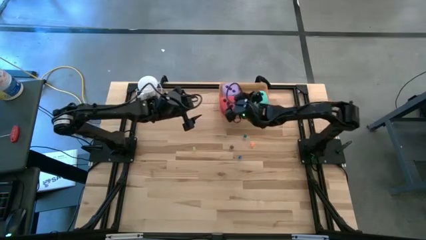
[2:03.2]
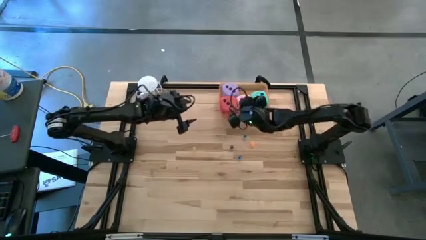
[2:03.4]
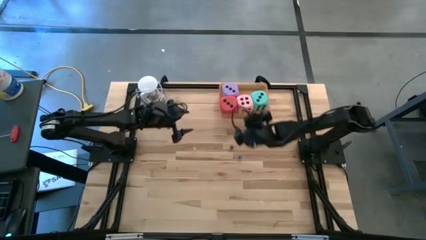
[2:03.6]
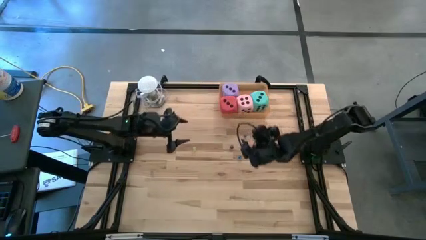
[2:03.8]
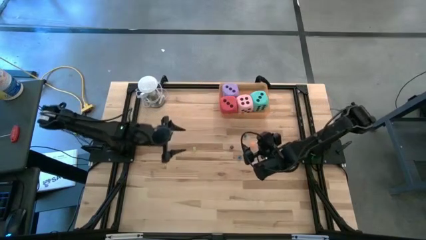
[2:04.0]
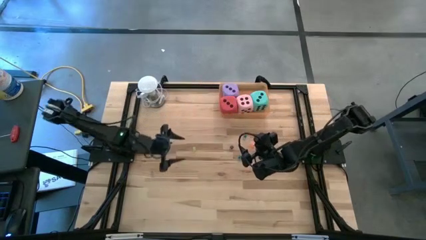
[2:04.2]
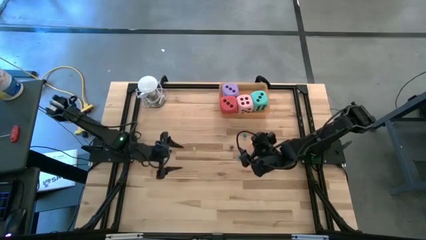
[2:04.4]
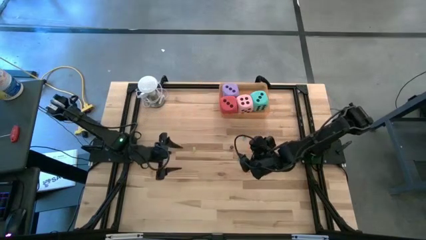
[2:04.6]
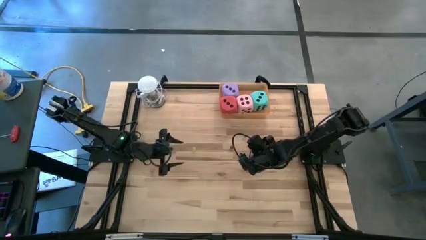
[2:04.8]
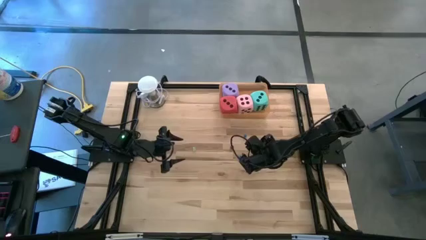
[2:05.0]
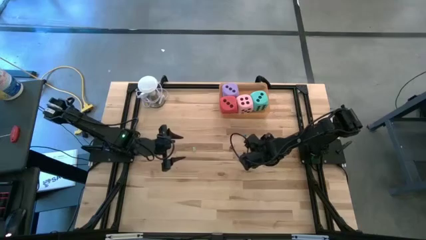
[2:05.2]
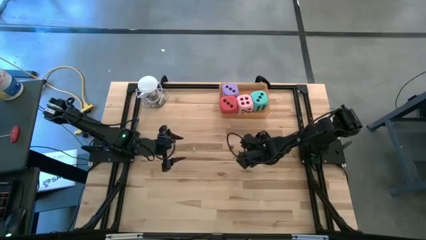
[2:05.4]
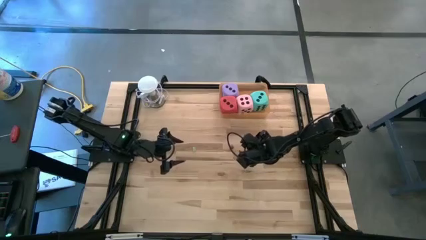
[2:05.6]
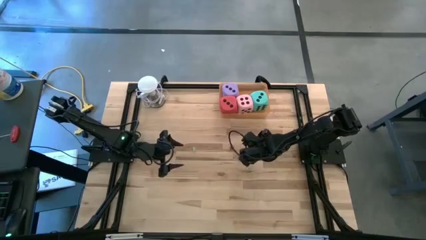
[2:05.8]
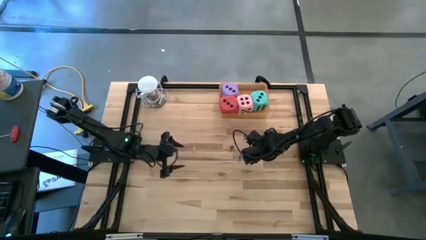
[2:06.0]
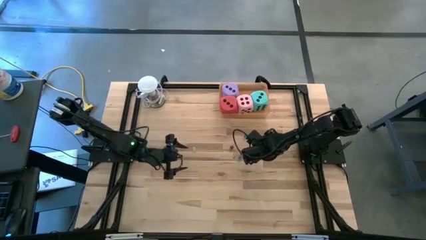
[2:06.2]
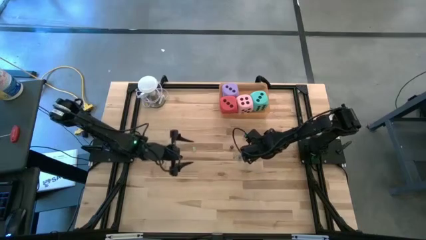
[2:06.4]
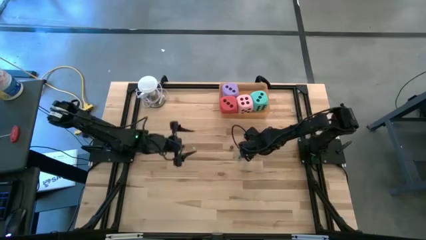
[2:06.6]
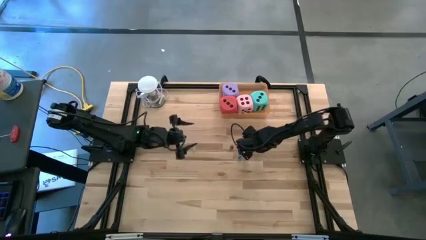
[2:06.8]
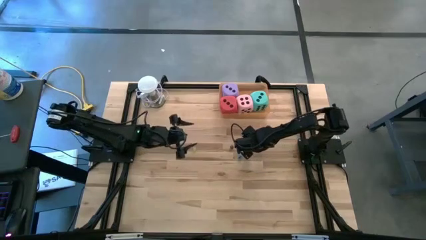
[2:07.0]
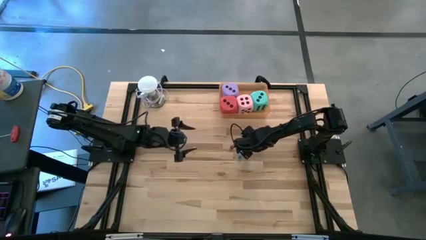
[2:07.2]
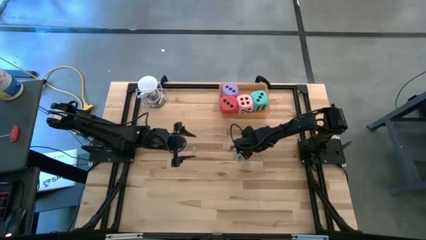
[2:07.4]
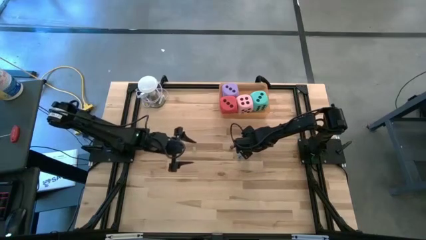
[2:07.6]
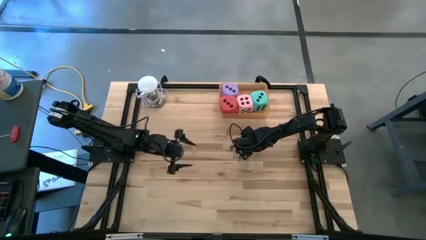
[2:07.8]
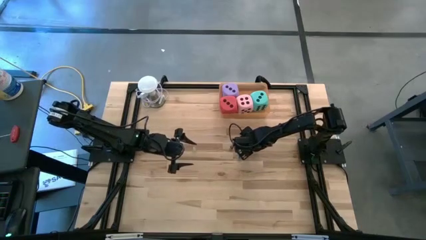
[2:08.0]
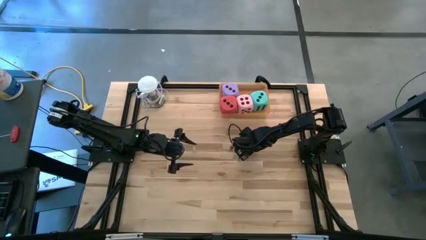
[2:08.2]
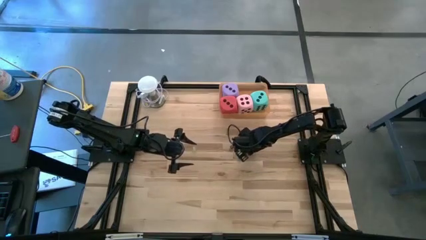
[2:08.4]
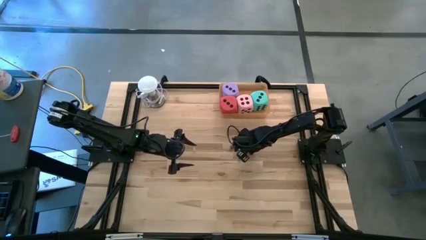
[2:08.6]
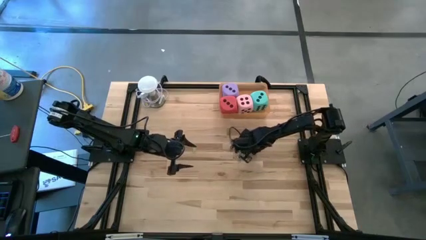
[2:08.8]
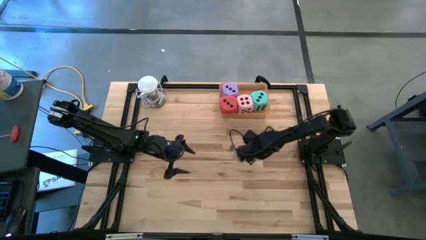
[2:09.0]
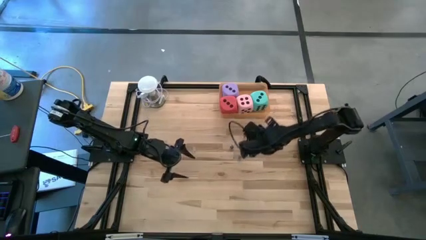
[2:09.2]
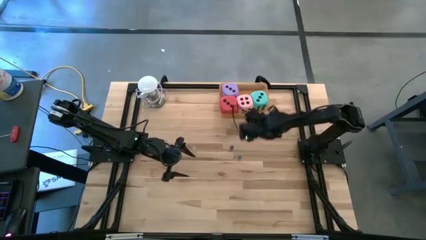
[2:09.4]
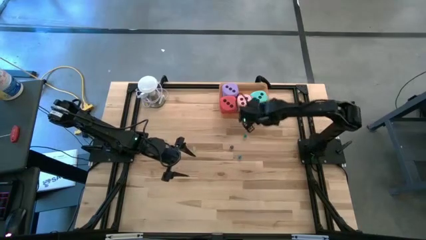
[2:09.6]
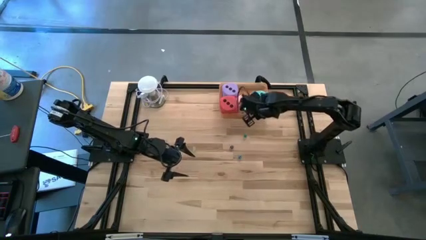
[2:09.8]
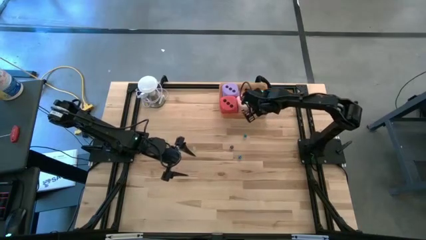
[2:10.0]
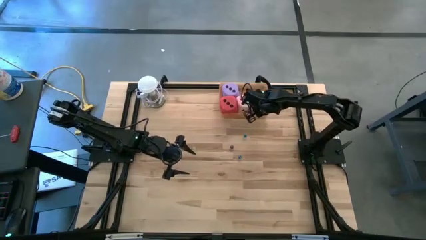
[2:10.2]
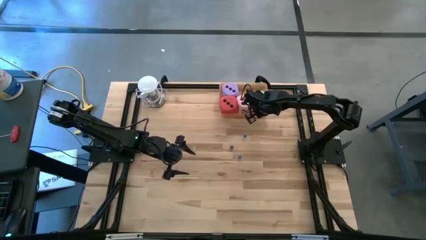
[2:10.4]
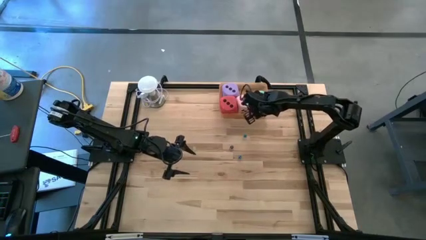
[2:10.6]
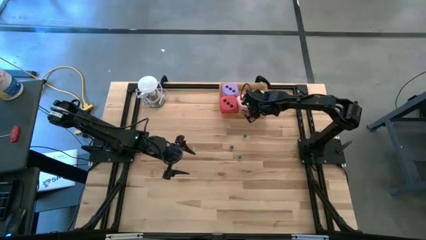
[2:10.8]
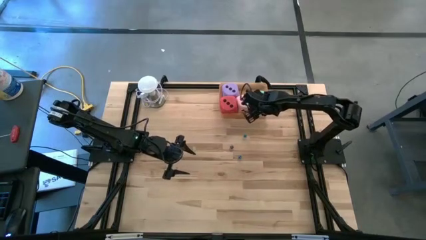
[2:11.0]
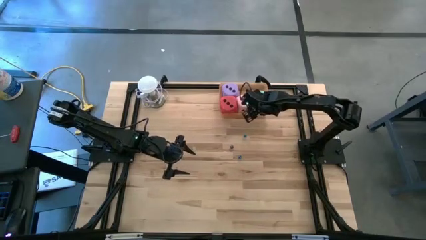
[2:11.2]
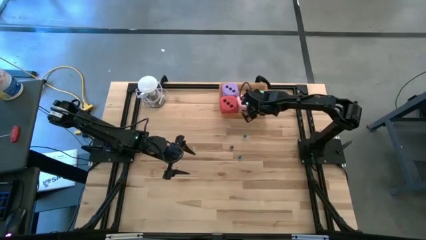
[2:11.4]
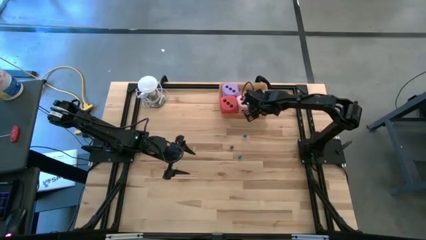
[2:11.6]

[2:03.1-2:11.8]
Task: Pick & Place Dice
Put the small orange die into the orange bin

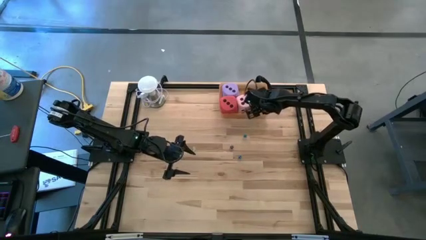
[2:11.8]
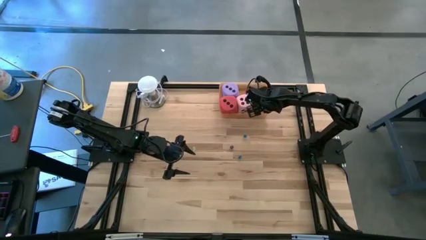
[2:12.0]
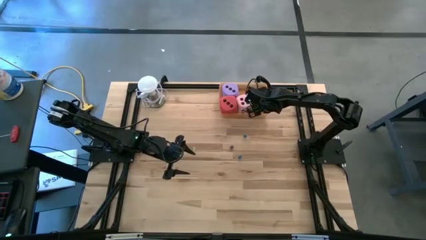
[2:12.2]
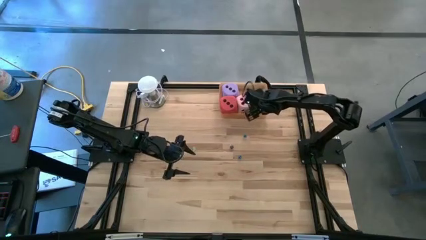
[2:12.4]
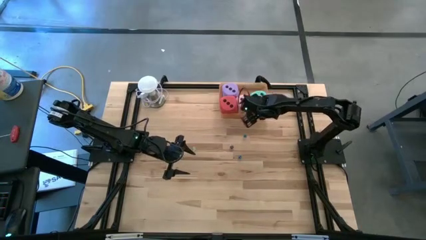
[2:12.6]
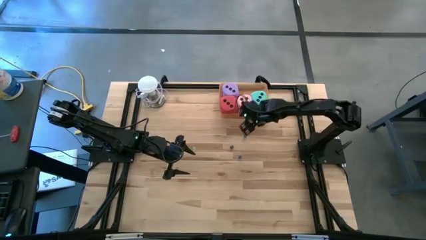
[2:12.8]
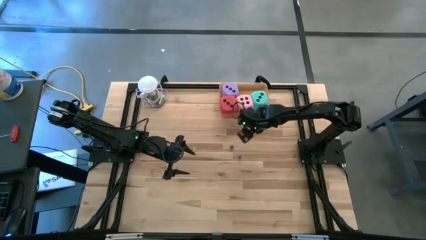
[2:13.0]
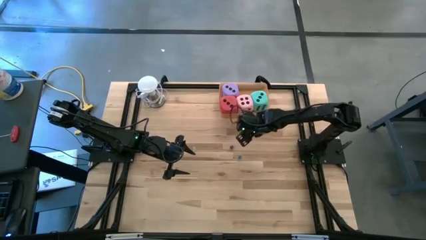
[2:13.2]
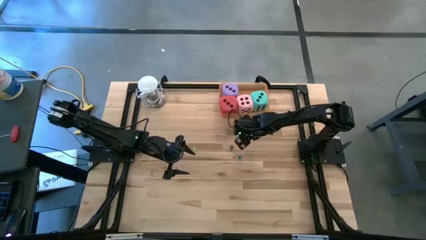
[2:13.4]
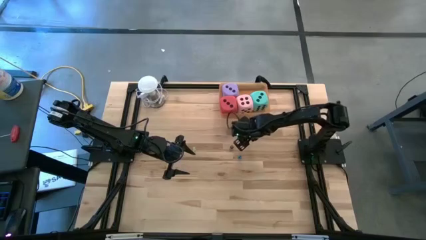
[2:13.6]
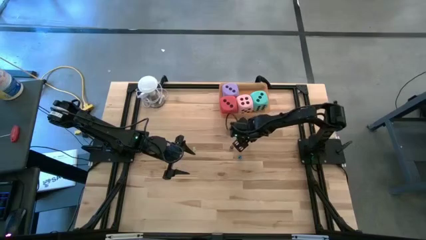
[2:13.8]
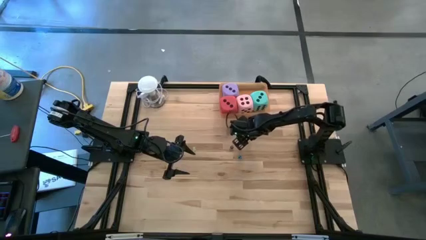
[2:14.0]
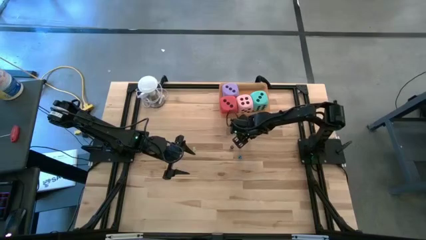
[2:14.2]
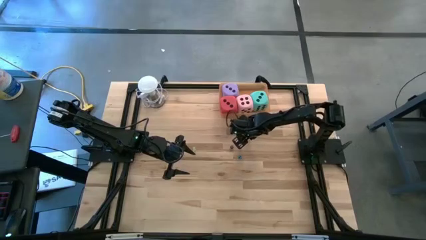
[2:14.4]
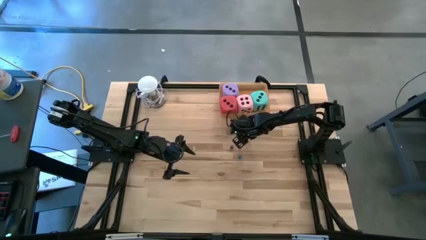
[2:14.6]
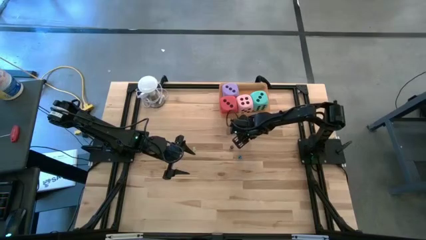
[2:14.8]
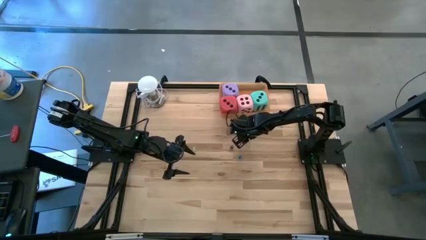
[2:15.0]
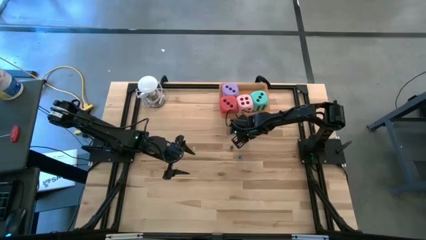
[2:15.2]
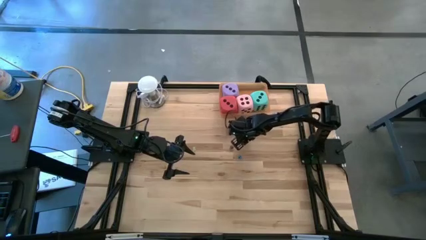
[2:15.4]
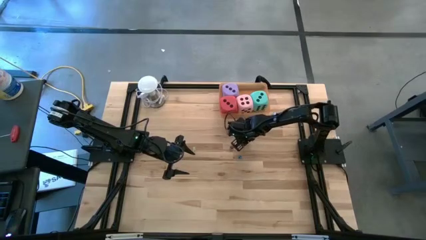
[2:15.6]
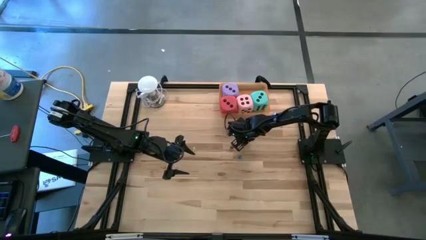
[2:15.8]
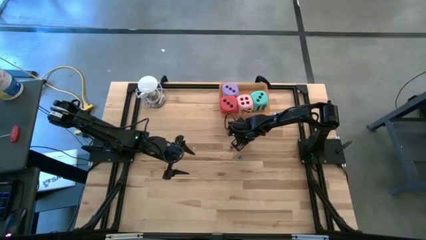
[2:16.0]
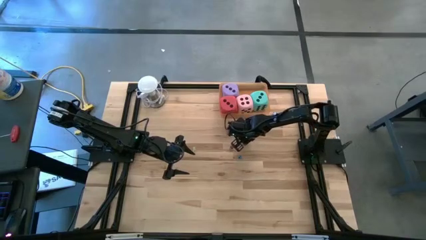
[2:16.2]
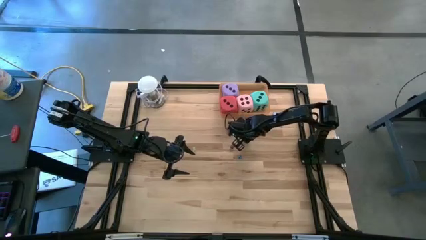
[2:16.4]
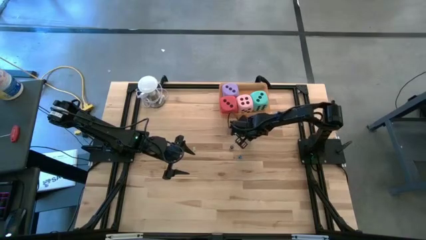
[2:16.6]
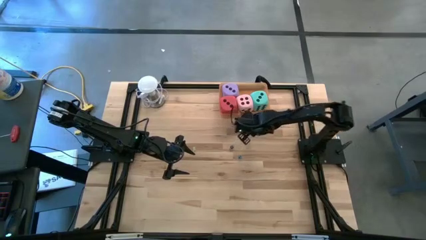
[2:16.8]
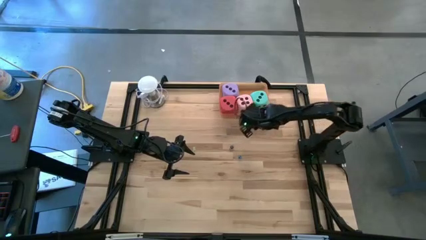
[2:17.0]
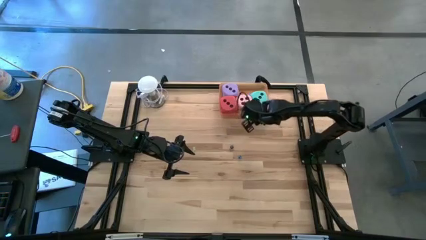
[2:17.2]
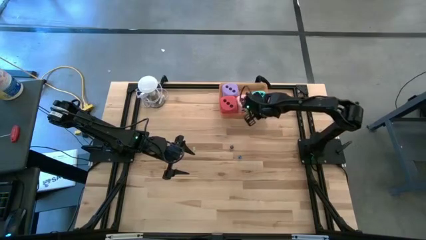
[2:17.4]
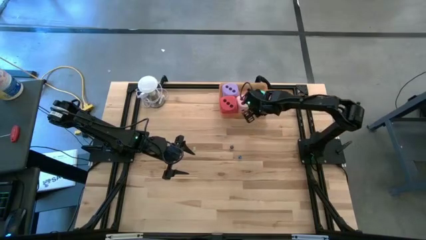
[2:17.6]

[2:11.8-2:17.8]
Put the small light blue die into the orange bin
